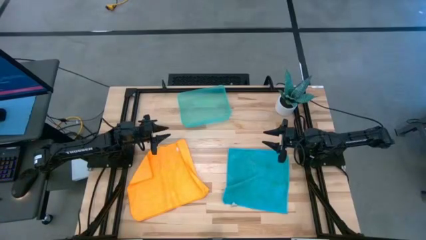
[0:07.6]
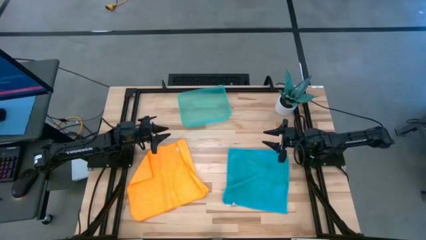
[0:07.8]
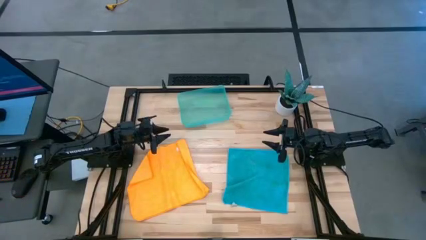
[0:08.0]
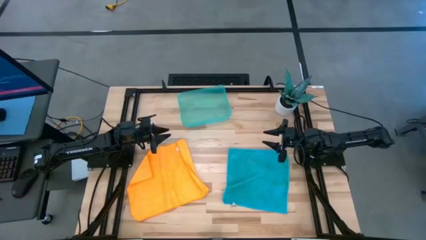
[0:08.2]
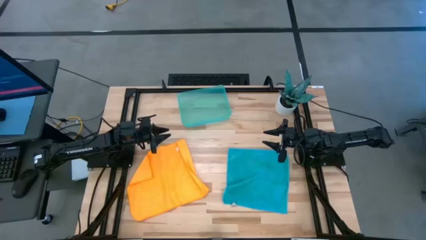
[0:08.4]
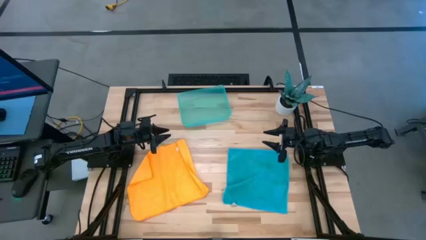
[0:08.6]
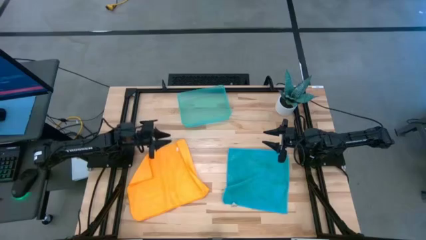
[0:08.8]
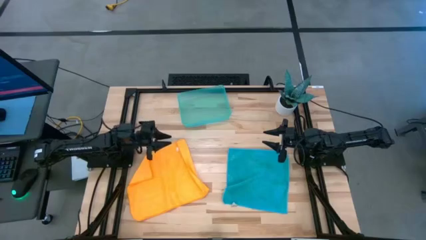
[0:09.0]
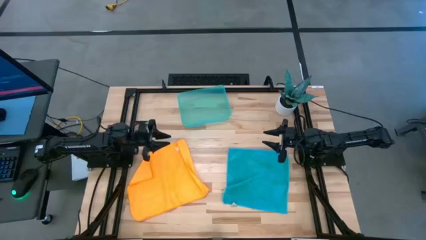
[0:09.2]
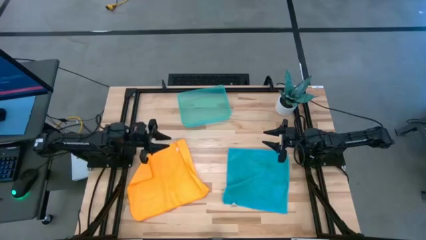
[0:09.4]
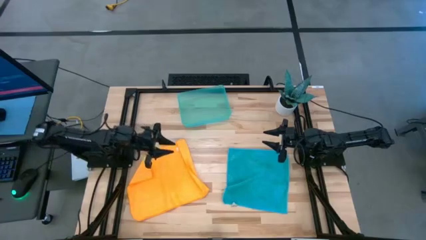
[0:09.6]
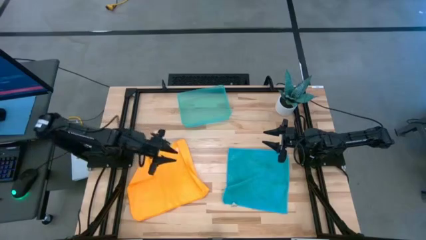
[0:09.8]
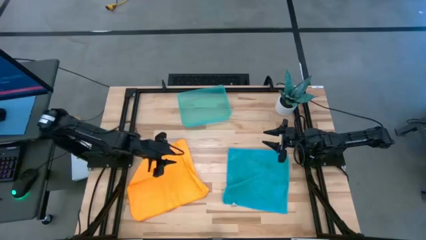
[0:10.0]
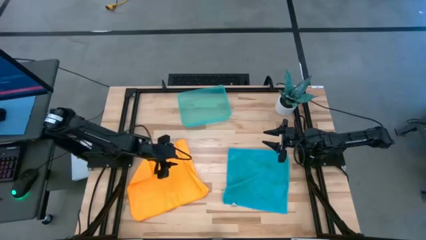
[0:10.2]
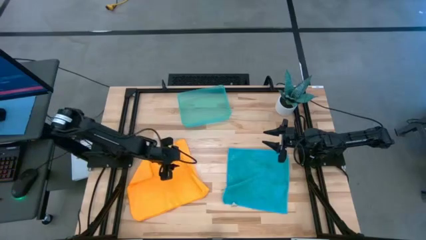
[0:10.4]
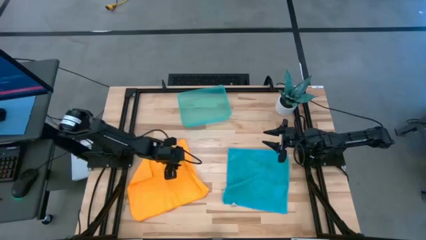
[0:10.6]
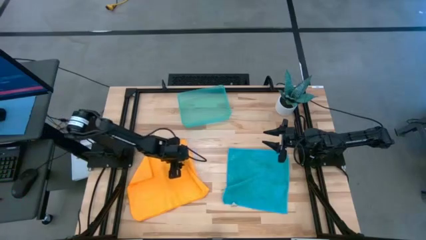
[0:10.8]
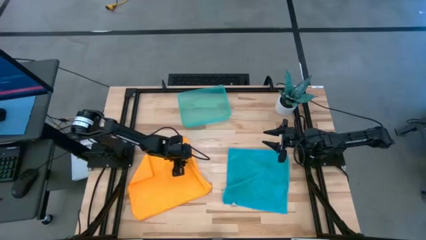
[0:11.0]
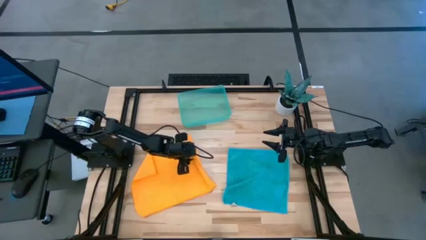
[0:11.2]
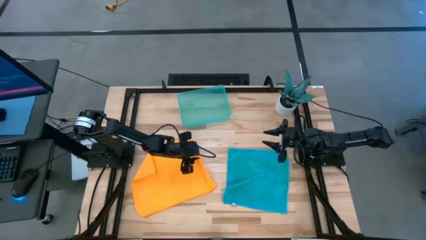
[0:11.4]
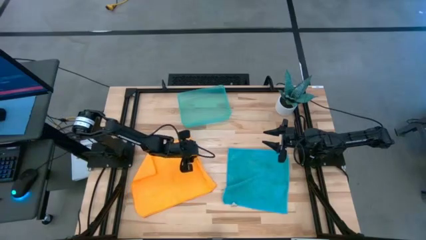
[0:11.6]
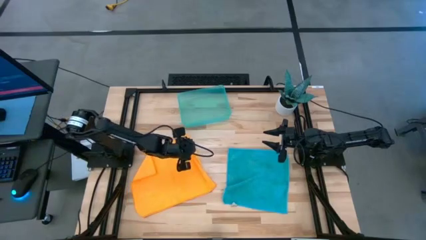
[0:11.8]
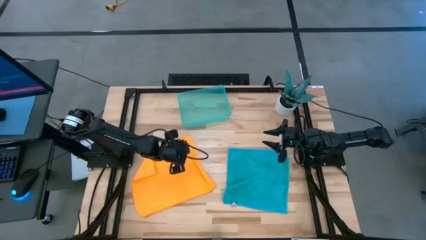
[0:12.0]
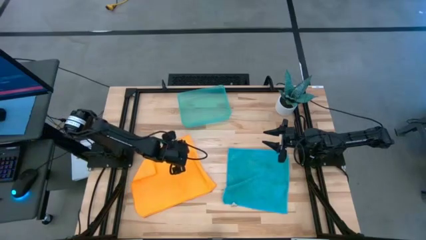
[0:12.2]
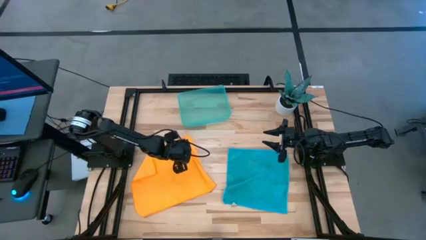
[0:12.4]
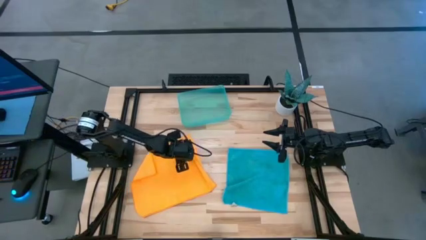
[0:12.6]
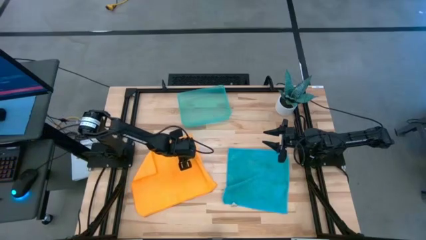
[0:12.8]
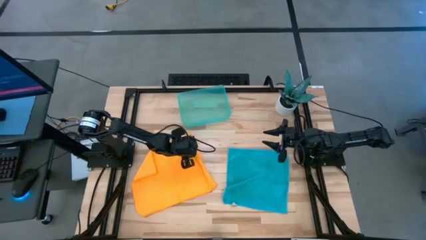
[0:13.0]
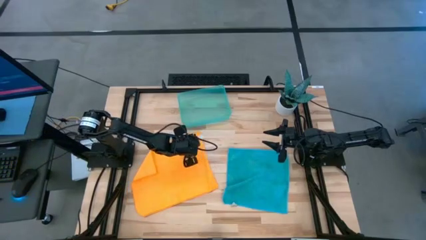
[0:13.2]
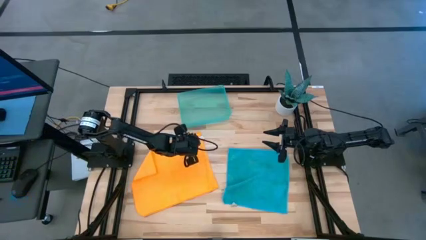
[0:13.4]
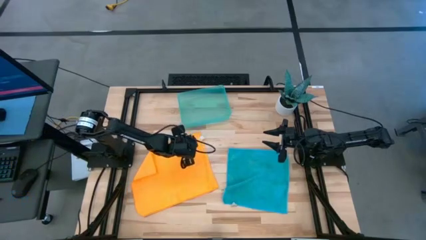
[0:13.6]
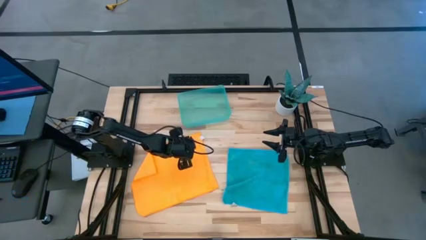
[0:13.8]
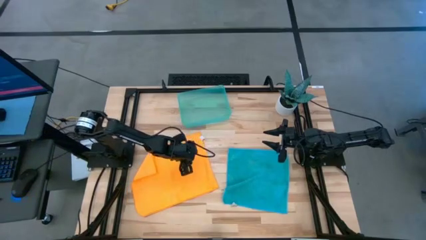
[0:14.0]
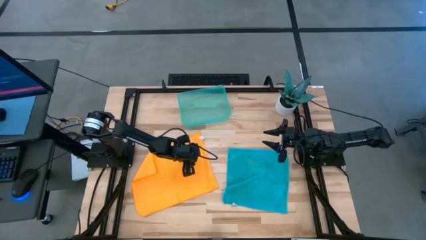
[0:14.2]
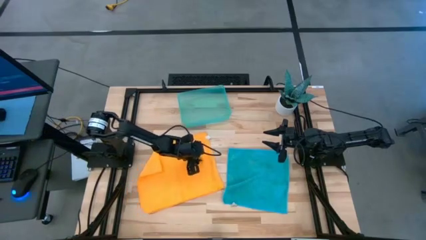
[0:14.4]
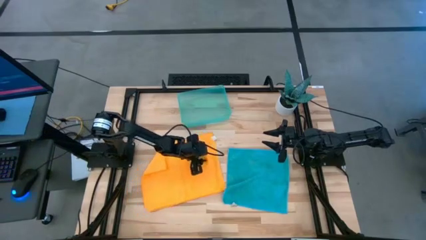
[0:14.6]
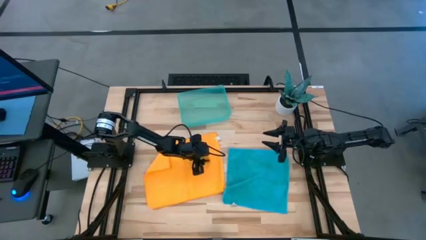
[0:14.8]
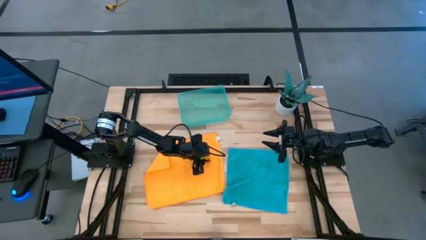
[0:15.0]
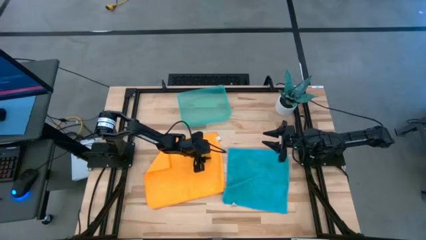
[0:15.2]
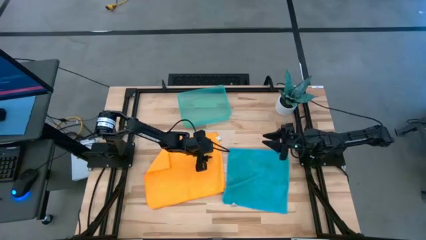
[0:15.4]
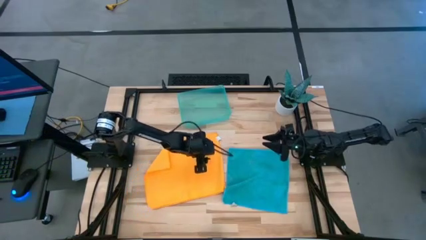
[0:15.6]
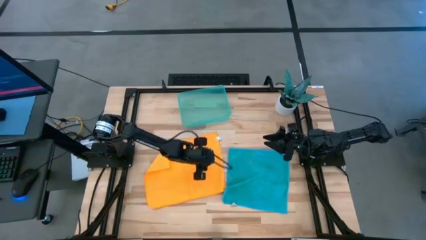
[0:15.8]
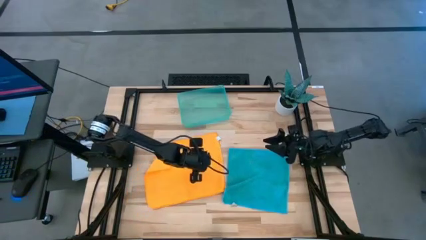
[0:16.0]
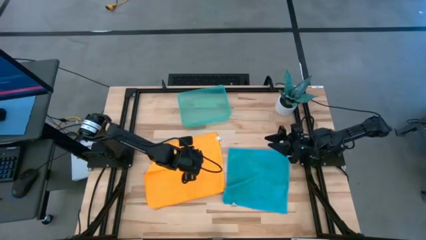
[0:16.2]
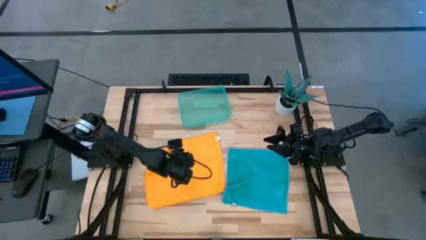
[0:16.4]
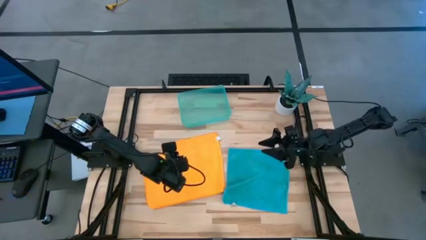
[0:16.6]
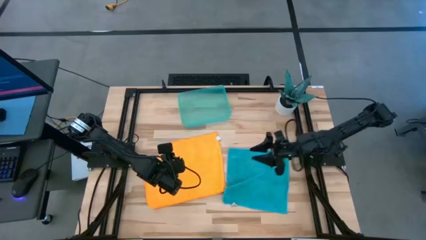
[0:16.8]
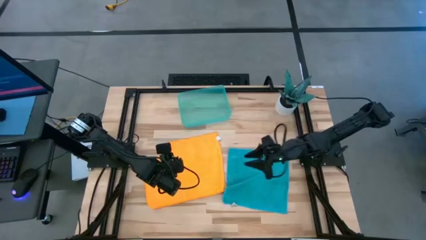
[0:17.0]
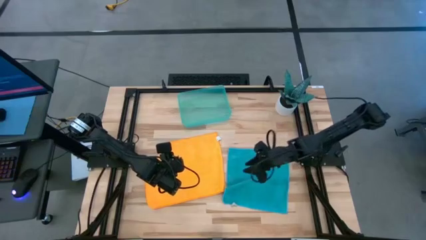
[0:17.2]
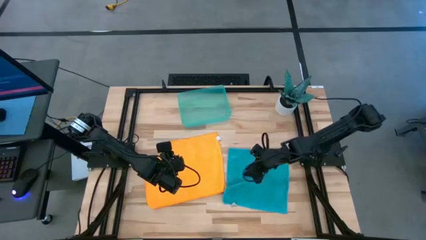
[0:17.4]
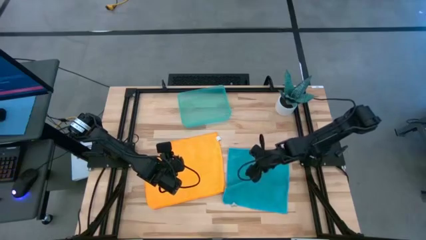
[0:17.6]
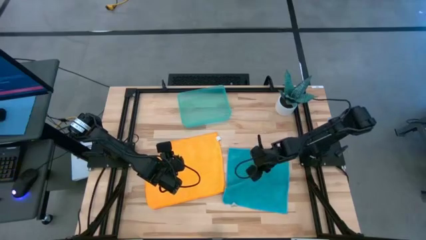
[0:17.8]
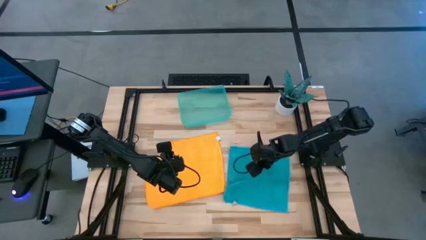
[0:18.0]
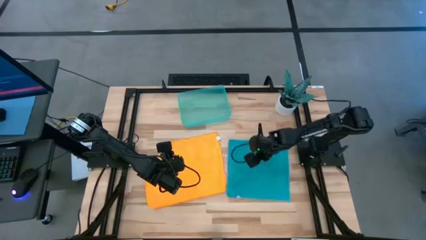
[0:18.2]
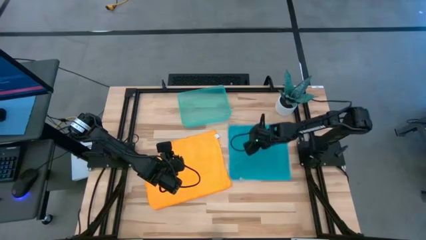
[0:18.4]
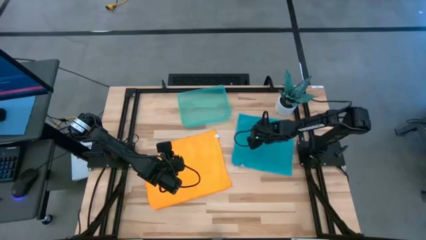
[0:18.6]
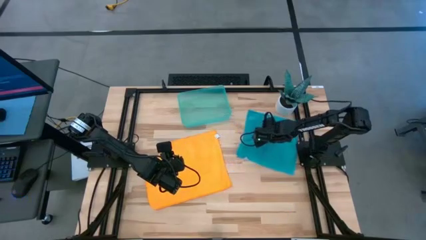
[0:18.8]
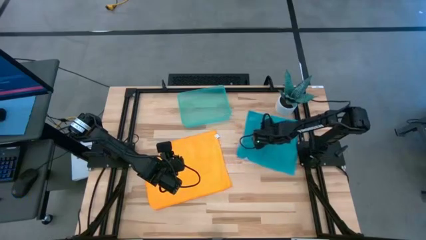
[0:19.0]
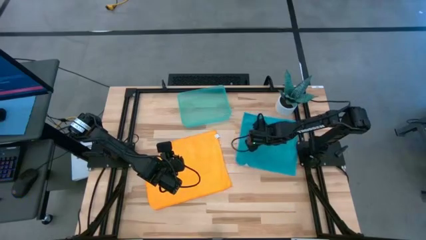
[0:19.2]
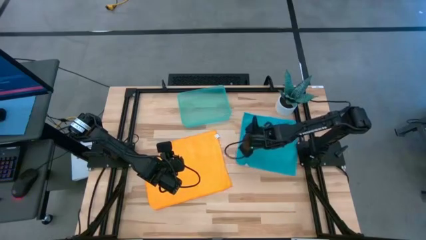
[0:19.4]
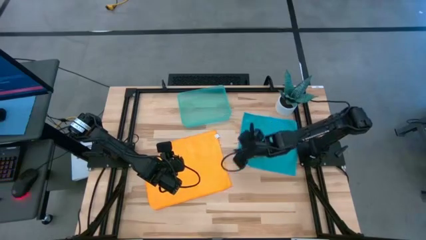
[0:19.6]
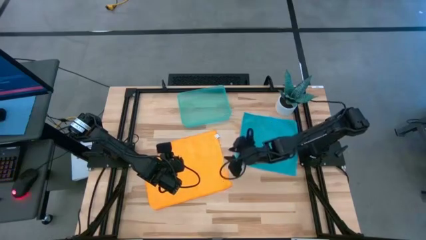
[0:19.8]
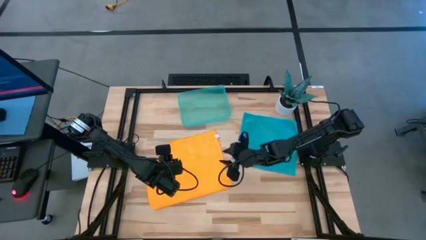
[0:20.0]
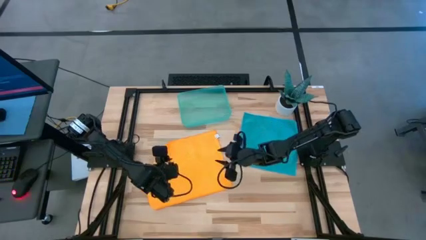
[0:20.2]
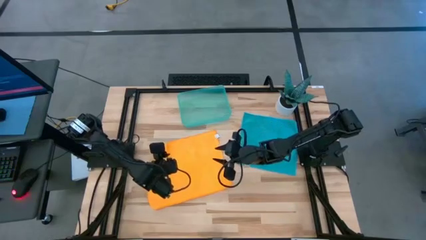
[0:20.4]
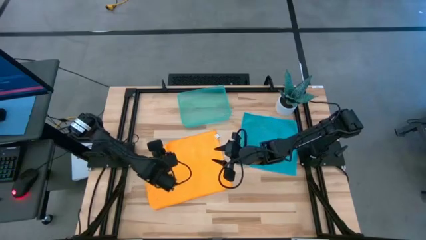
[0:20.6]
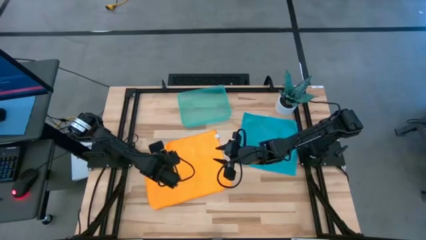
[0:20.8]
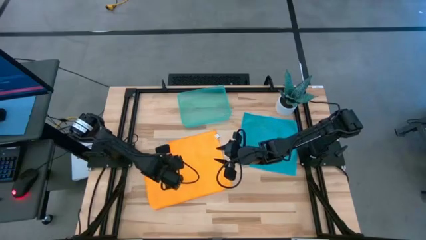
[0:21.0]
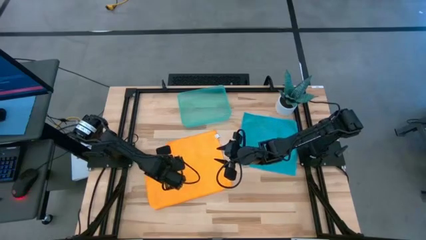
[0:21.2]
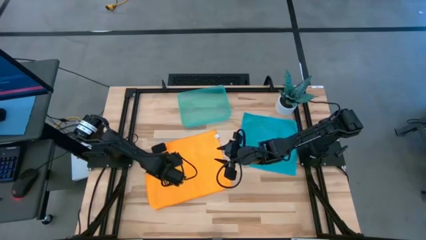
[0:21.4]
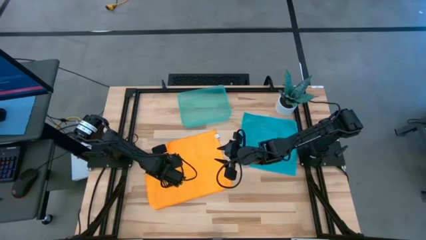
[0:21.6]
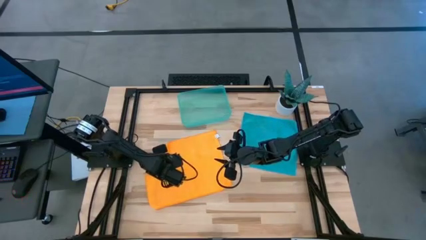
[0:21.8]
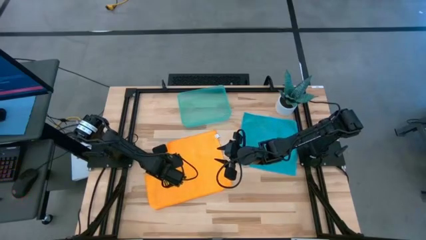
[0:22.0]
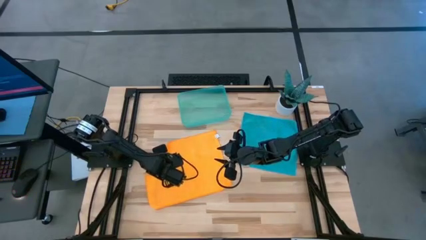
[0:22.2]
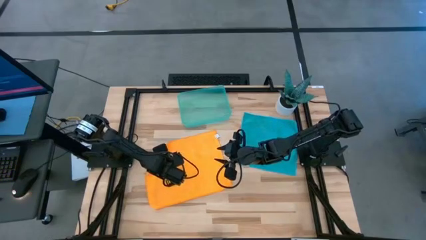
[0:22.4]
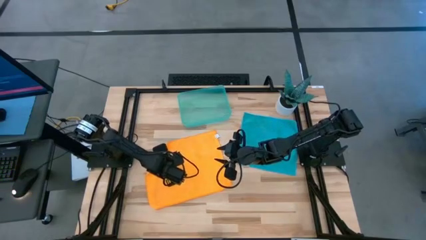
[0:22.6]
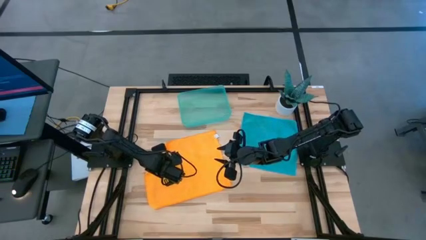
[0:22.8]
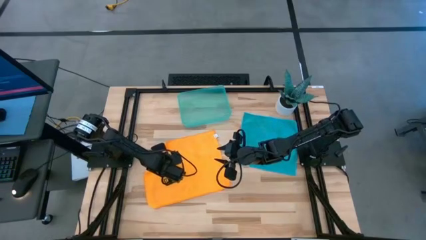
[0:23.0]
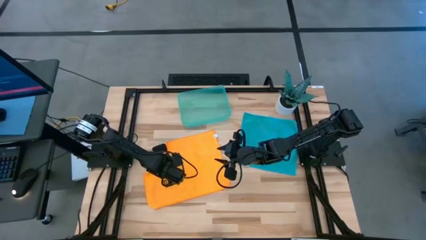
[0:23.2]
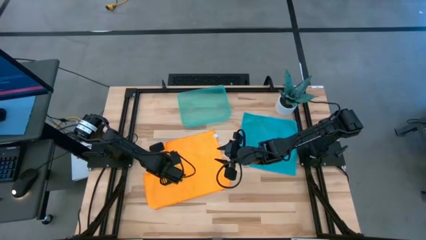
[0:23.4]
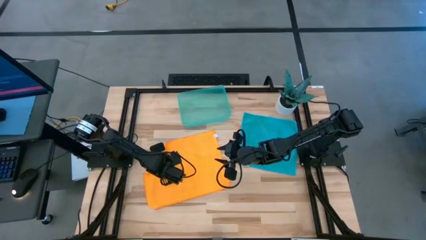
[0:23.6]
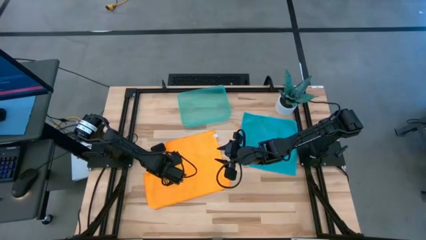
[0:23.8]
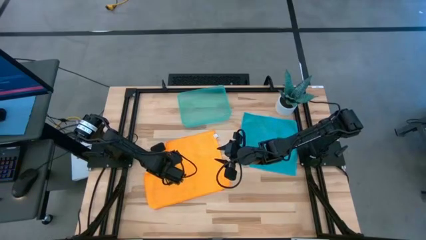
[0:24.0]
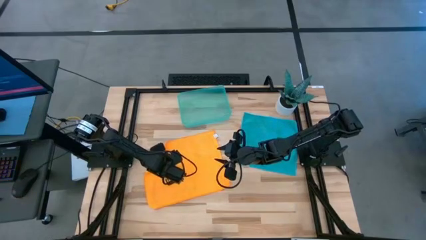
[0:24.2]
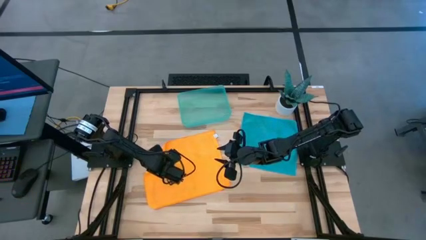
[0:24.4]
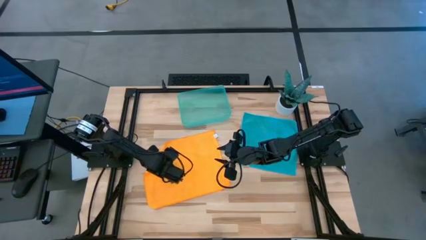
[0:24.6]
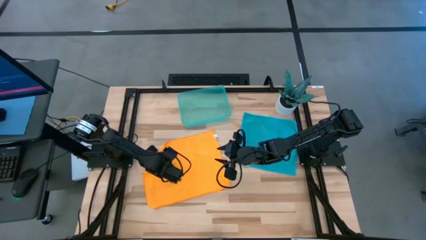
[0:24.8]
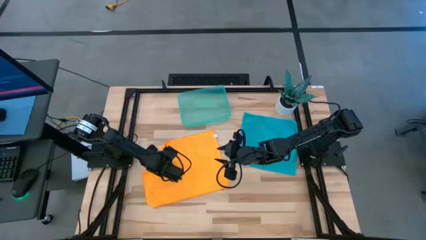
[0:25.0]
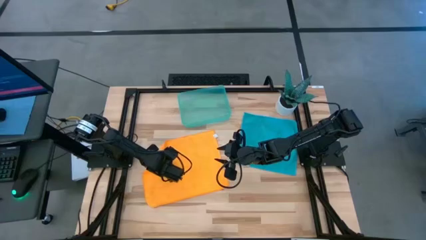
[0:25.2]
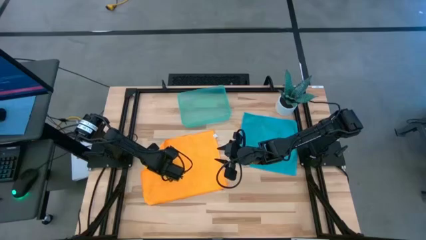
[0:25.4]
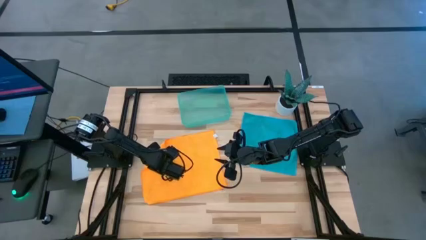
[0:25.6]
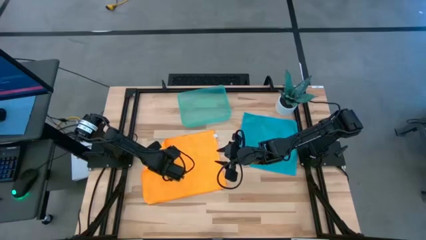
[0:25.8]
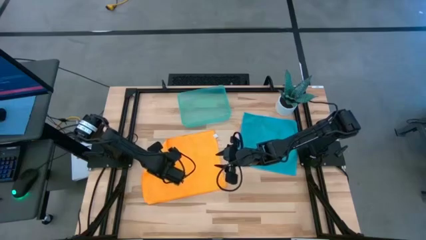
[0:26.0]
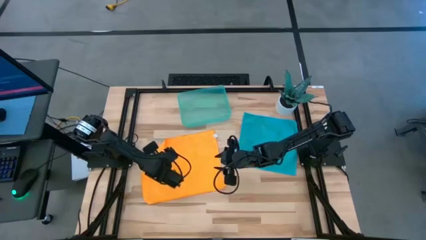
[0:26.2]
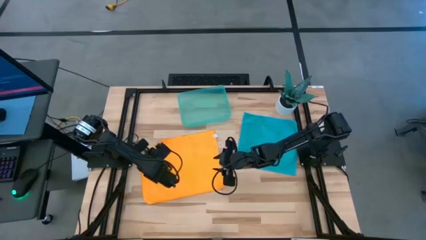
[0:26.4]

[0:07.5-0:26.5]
Task: Roll microfiber towels into tight, uniform cylinder then place into a basket
Roll the yellow microfiber towel
